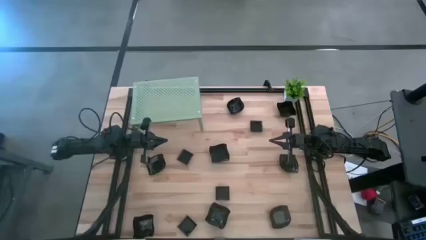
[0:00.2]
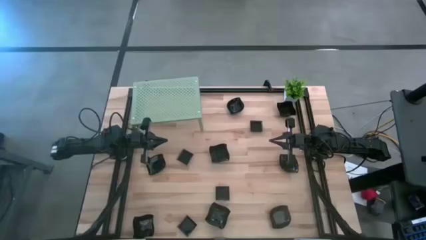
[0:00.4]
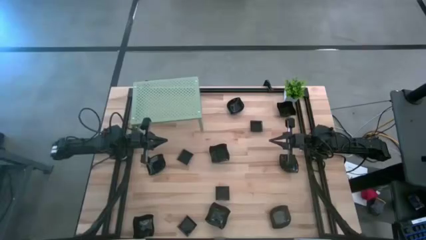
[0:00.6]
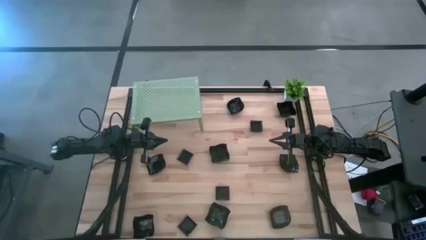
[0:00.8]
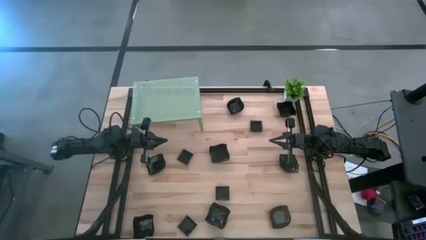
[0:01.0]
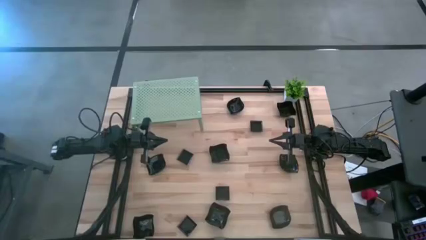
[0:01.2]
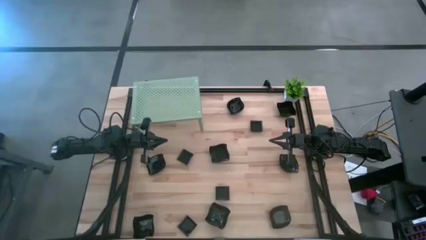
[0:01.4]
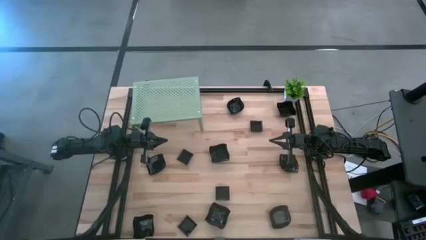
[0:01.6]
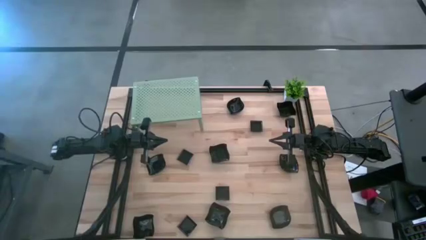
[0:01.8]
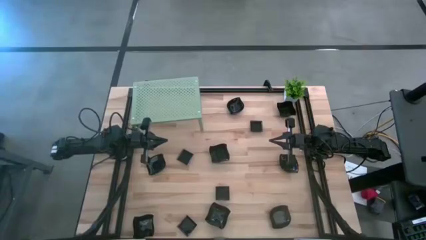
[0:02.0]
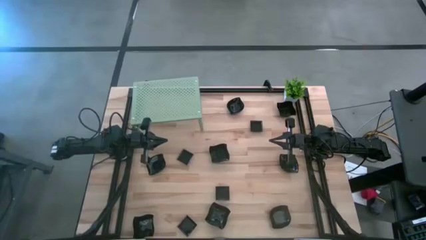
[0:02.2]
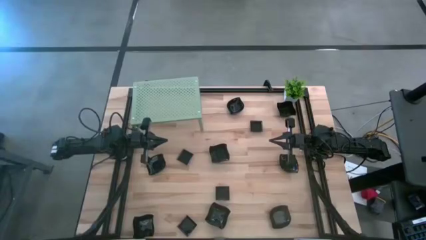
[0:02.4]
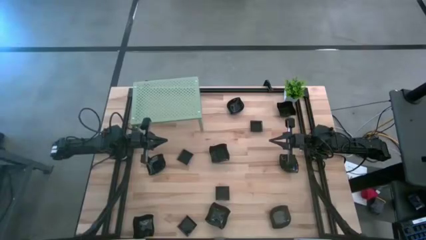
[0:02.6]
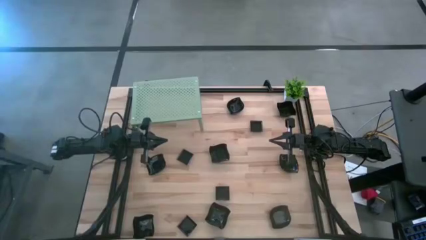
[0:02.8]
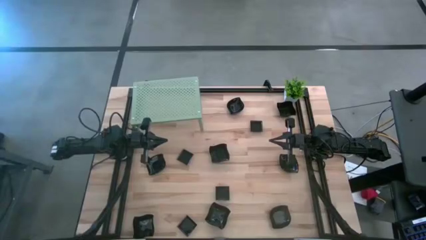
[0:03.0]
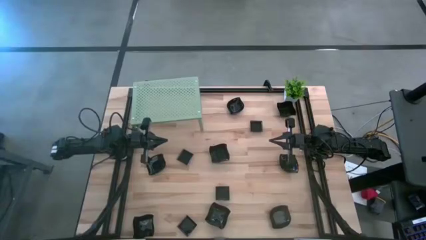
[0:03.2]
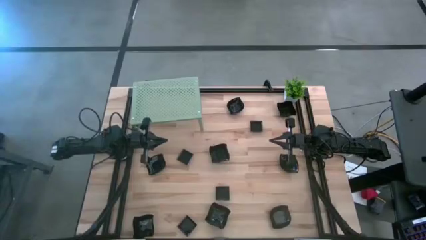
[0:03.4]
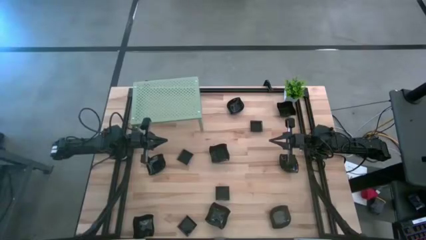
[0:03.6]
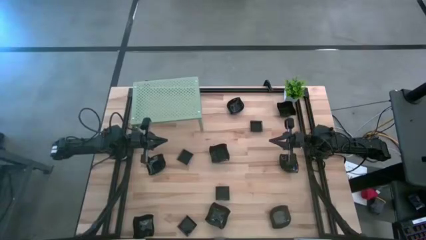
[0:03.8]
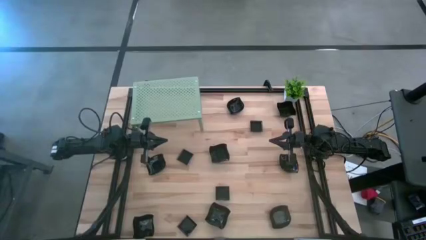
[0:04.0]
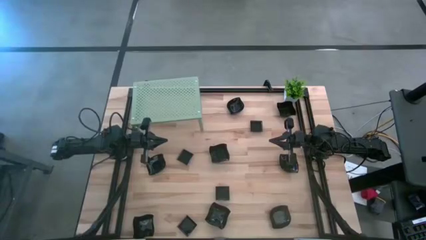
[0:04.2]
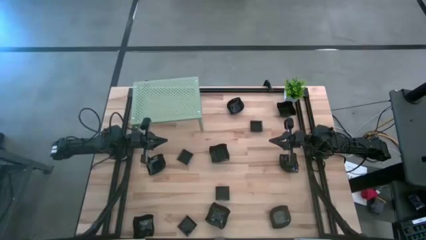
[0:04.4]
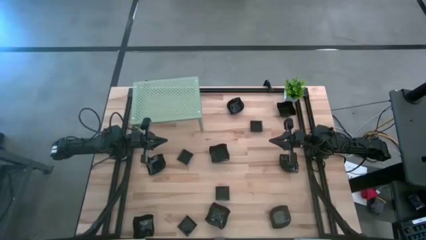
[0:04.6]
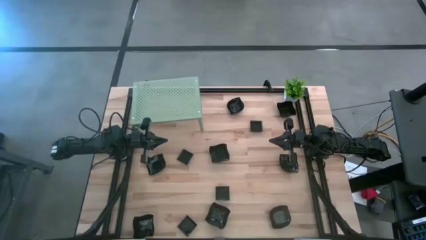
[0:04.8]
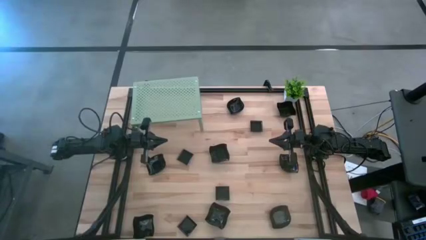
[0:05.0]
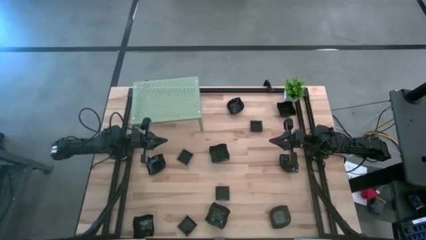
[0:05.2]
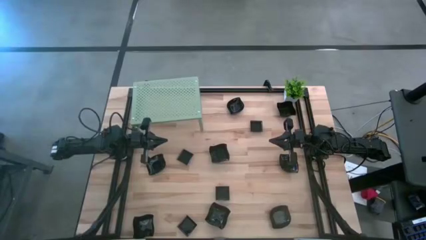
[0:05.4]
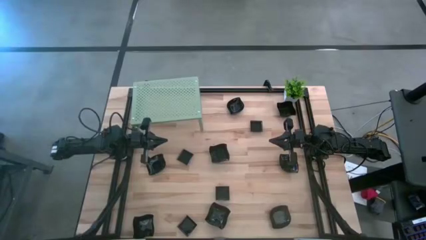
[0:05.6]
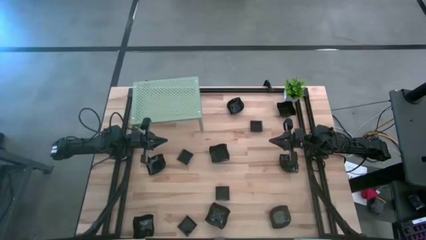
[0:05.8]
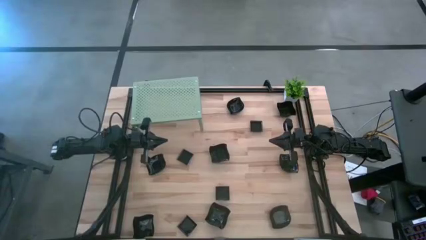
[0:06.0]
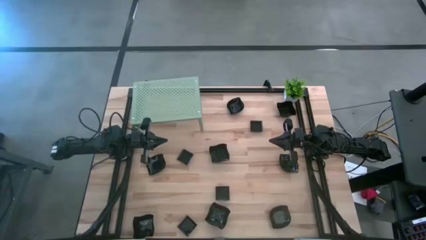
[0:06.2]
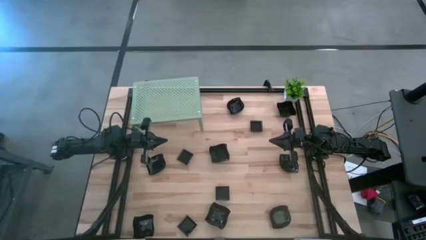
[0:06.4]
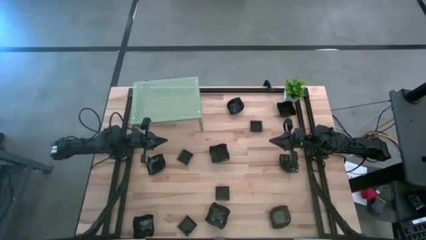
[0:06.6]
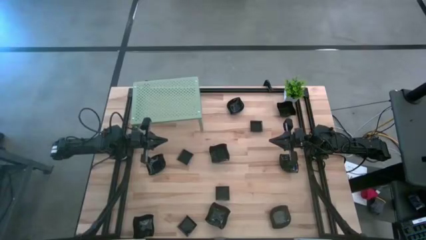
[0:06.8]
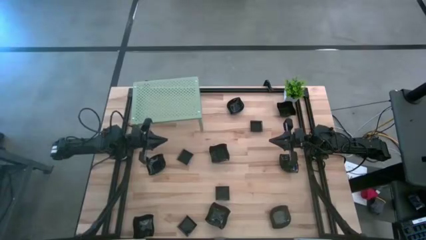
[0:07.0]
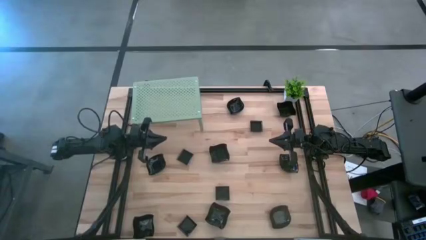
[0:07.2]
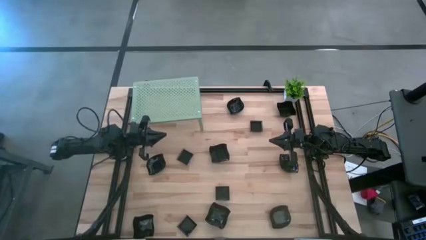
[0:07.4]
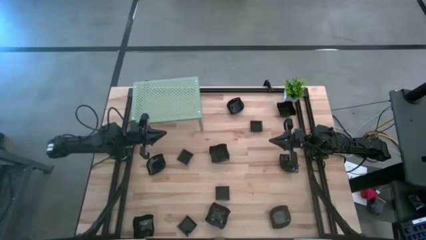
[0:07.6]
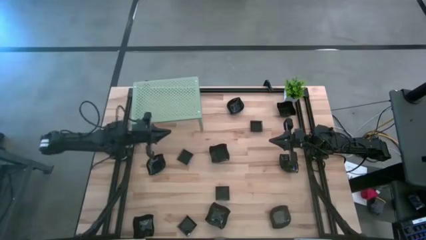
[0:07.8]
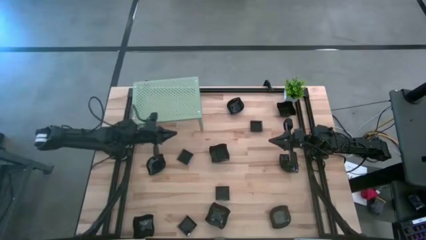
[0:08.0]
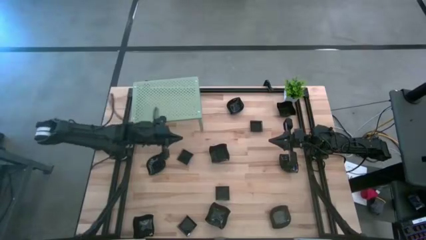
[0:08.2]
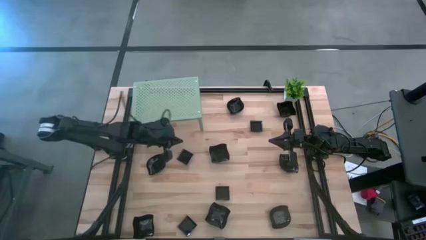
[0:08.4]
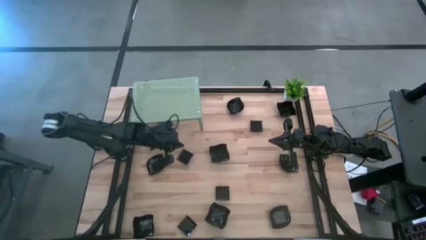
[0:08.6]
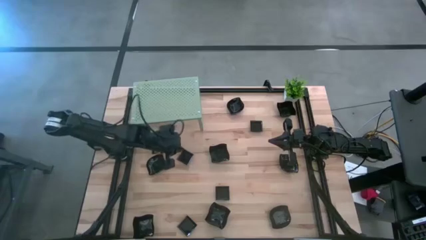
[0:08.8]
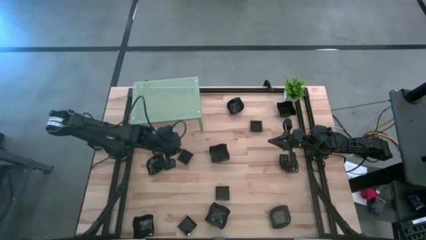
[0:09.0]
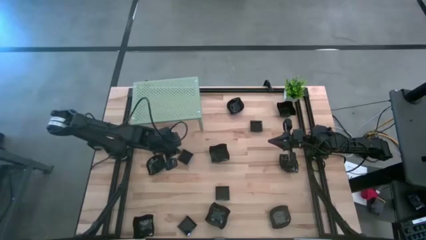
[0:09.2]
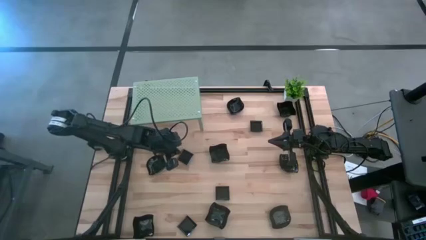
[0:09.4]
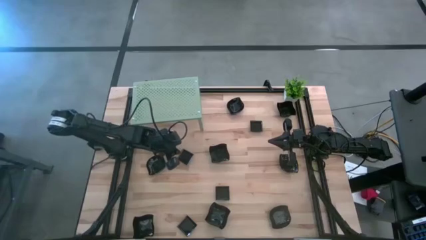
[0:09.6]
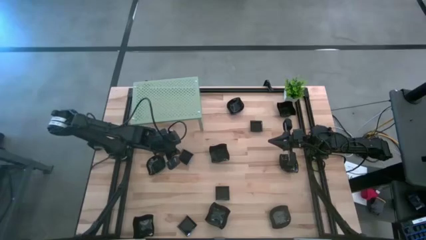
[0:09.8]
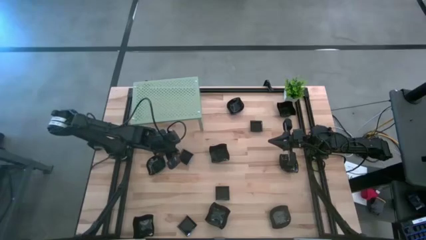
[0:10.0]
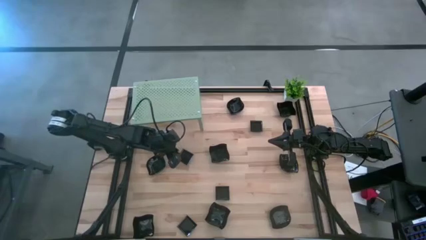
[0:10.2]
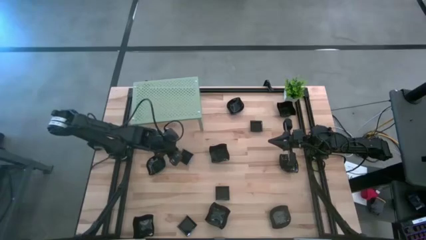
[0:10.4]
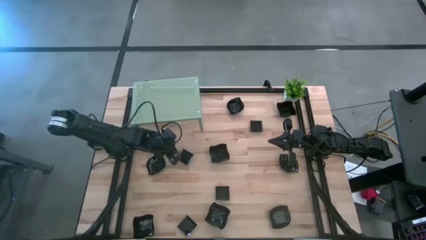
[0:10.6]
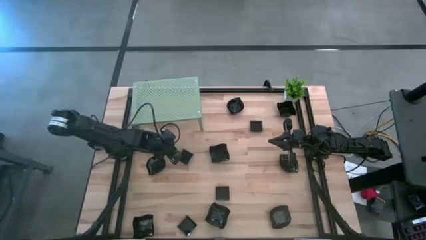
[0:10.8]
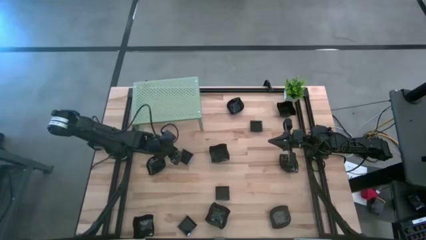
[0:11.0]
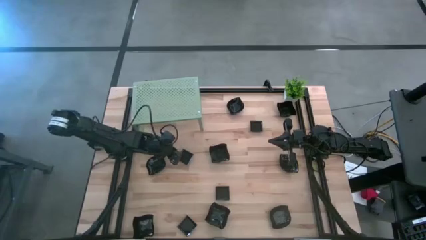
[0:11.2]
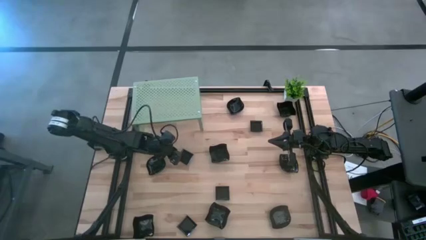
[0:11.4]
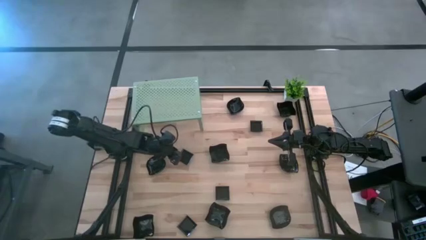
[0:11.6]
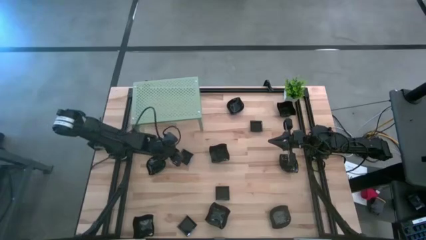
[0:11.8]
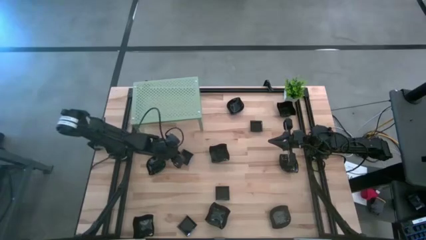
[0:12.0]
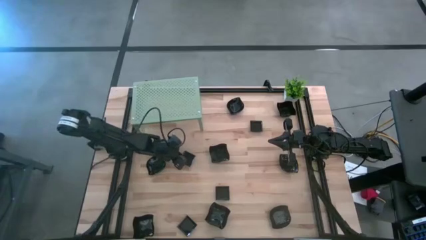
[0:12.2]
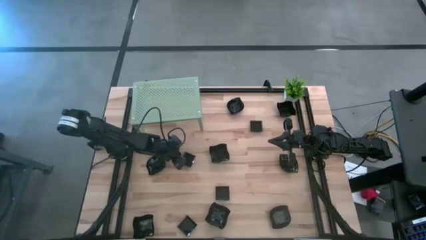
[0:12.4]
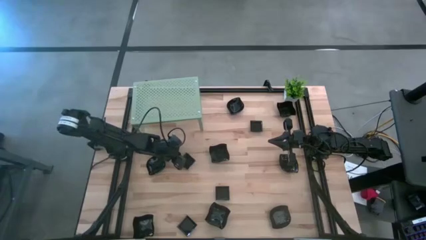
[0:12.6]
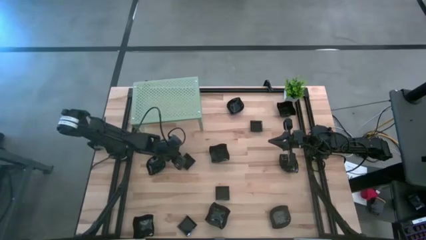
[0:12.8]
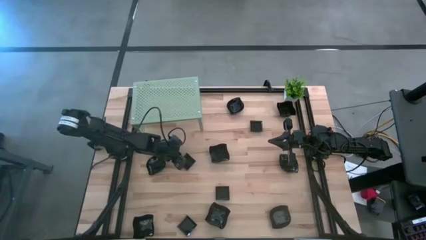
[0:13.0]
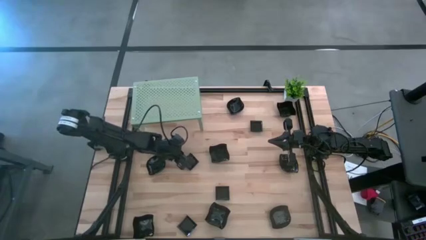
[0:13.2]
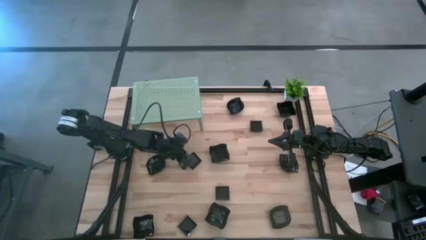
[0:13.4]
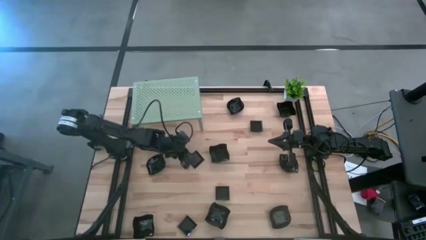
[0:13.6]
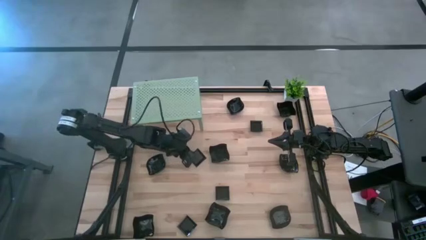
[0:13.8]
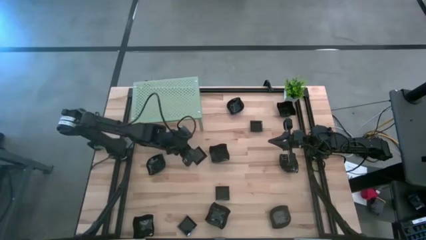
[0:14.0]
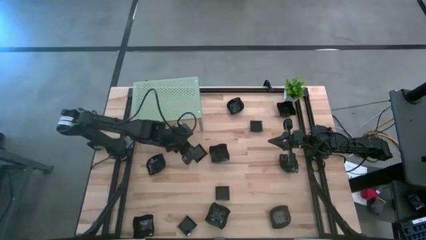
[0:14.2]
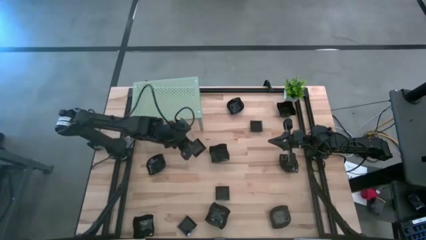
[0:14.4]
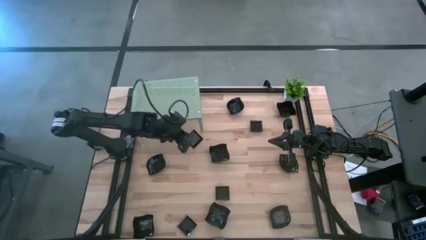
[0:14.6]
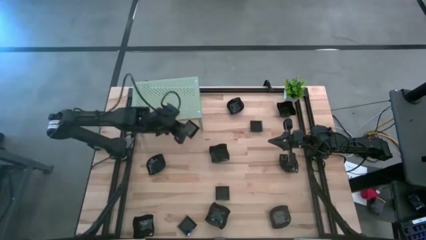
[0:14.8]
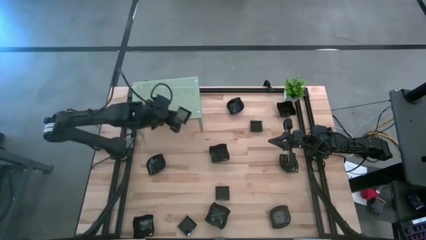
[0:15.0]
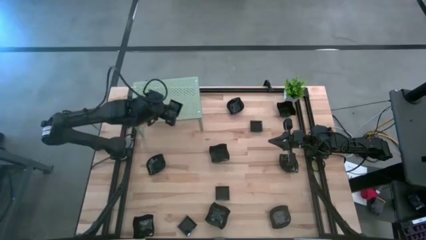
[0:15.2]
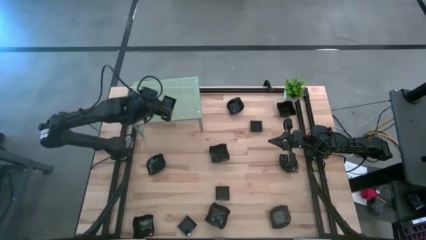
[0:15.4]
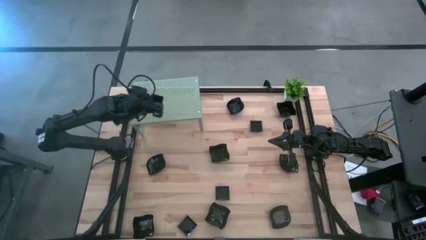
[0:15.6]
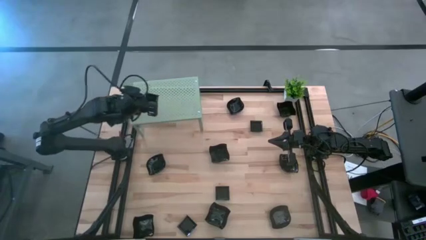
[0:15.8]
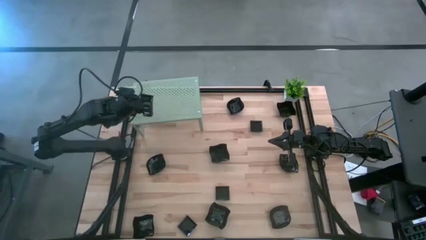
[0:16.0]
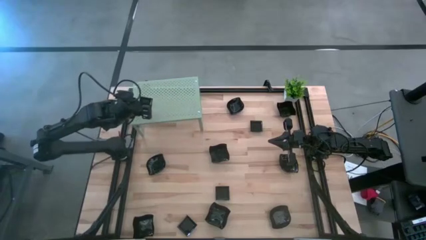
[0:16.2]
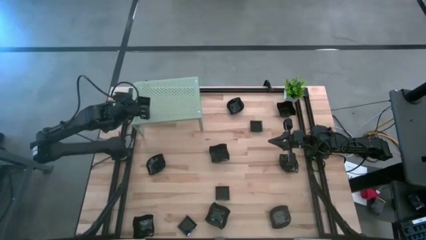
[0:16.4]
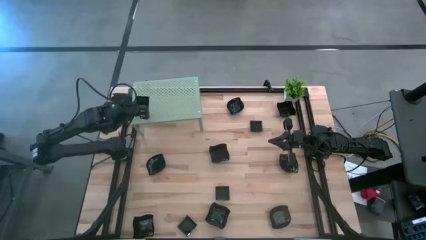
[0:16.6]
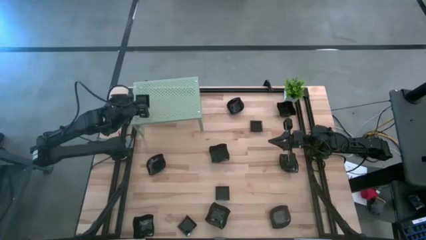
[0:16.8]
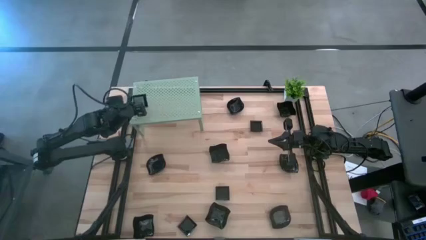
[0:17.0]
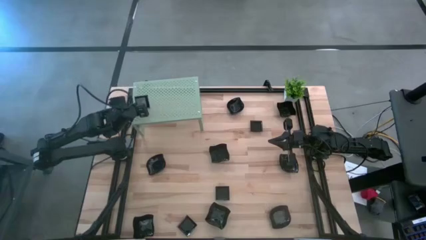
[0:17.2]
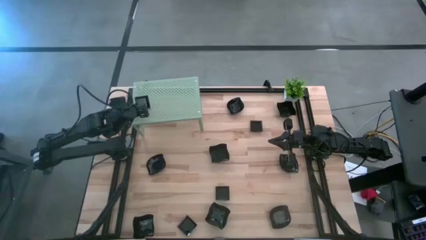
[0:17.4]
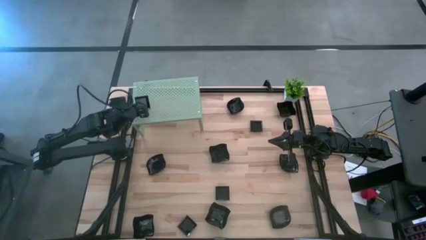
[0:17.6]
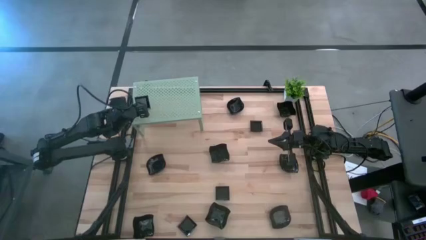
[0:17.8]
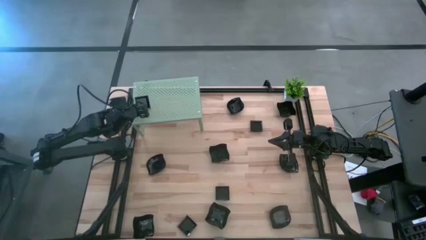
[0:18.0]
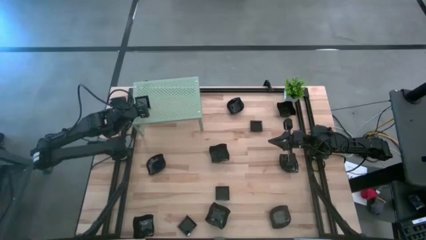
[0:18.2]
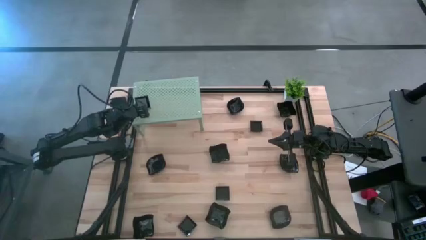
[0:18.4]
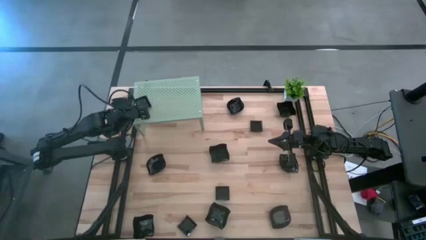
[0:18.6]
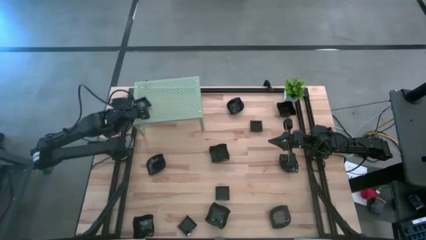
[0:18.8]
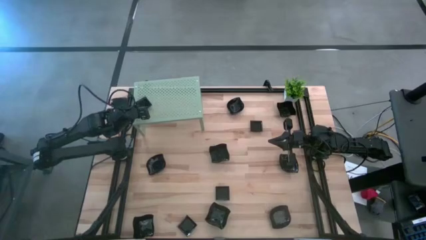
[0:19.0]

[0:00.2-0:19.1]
Task: Pick & Place Mini shaped plates
Put the black square shaped plate on the shelf
